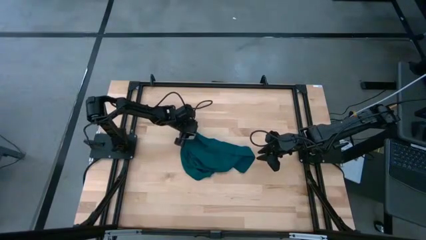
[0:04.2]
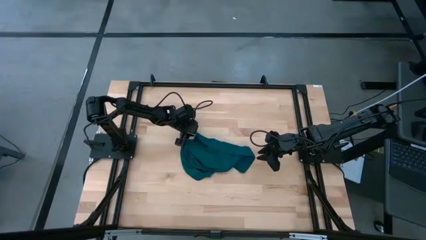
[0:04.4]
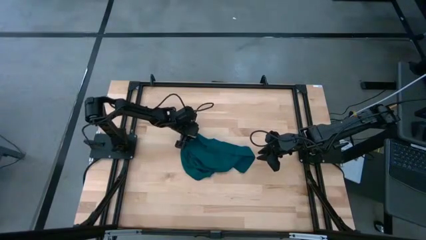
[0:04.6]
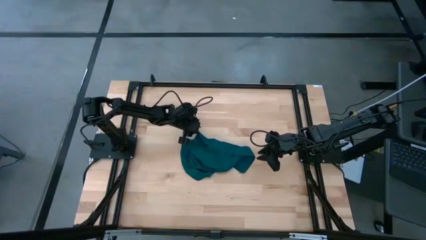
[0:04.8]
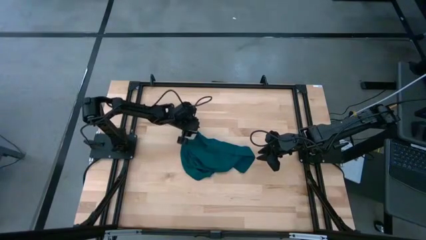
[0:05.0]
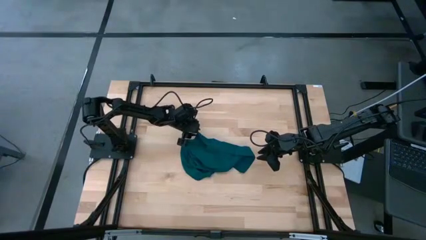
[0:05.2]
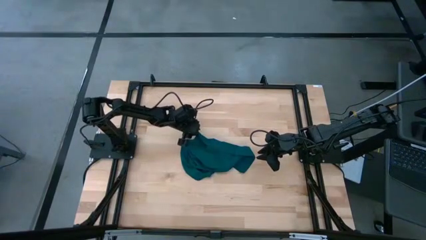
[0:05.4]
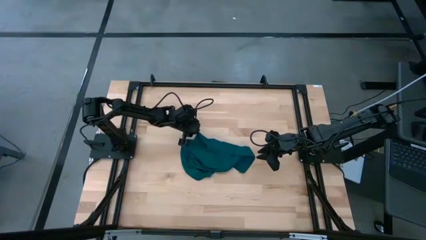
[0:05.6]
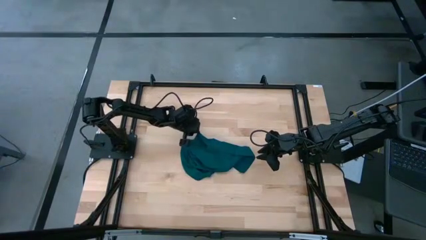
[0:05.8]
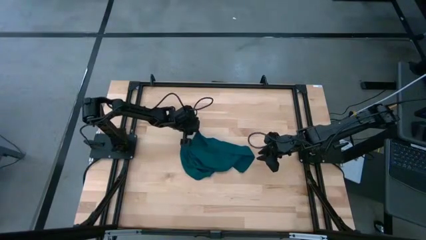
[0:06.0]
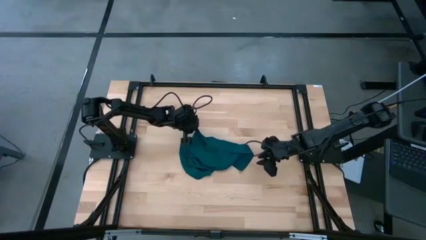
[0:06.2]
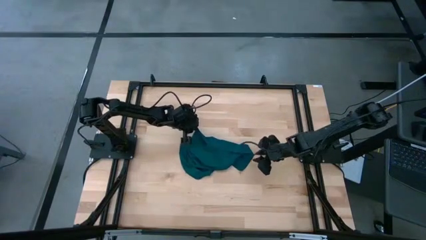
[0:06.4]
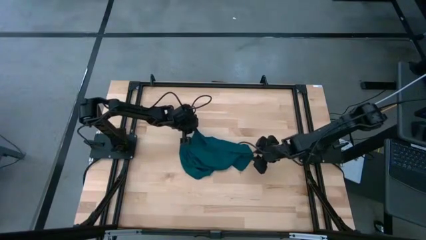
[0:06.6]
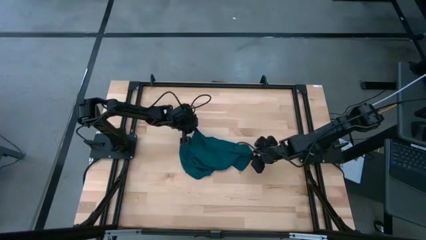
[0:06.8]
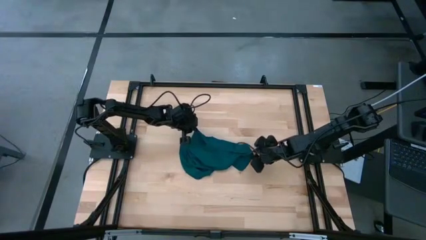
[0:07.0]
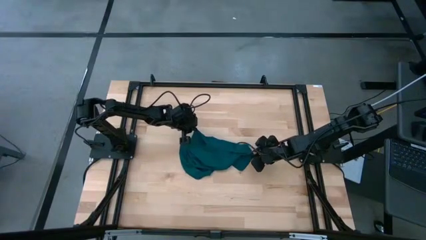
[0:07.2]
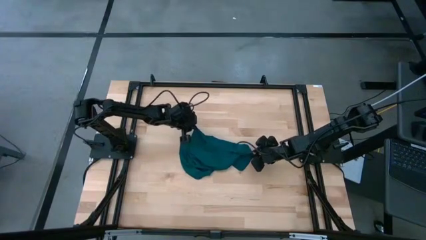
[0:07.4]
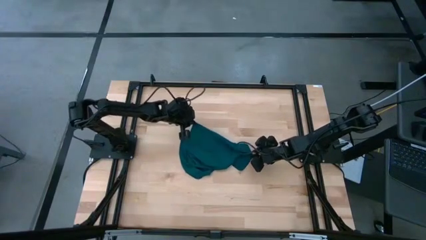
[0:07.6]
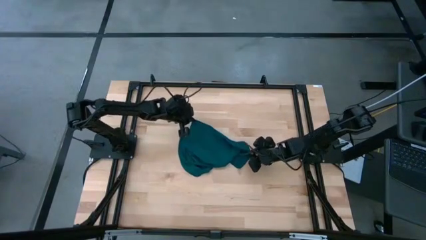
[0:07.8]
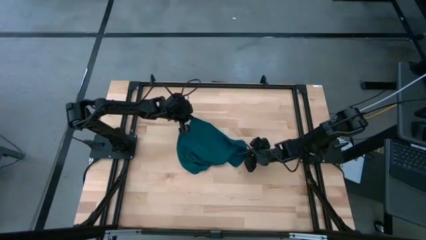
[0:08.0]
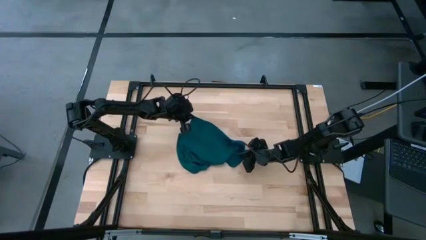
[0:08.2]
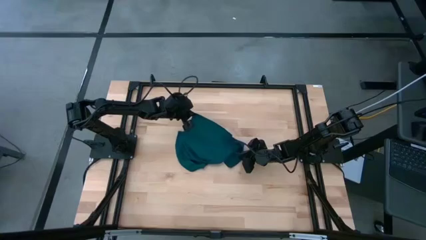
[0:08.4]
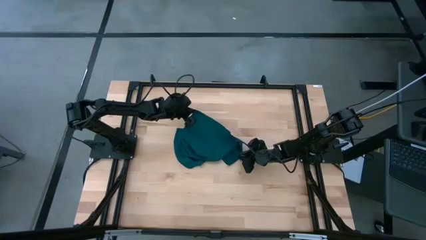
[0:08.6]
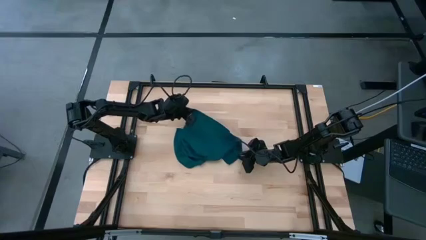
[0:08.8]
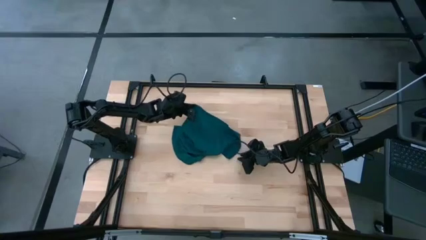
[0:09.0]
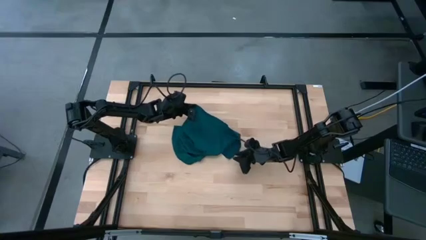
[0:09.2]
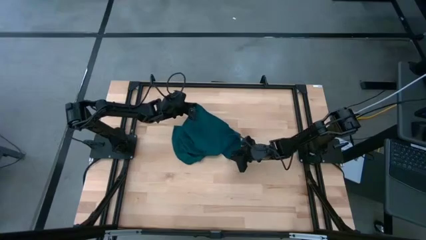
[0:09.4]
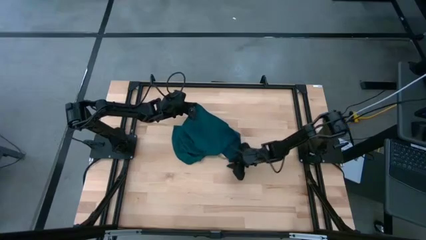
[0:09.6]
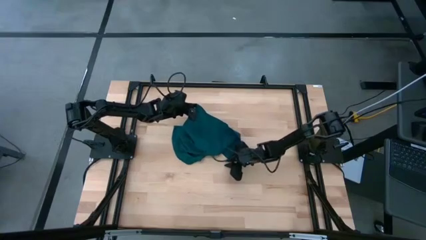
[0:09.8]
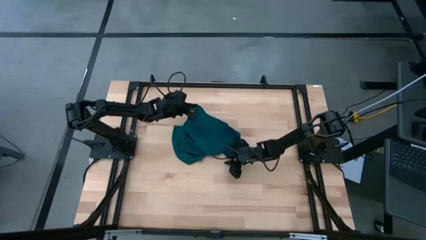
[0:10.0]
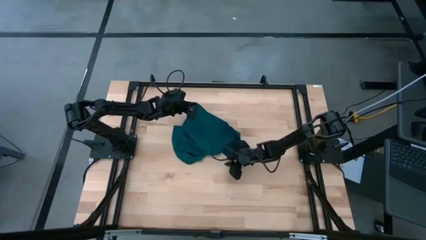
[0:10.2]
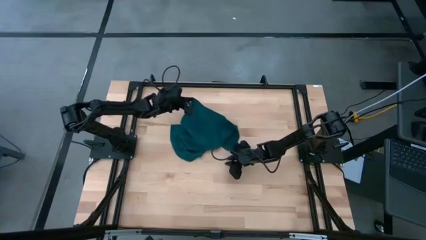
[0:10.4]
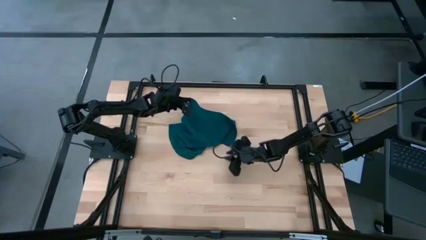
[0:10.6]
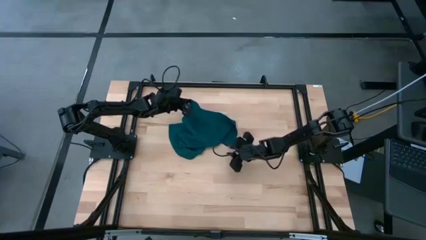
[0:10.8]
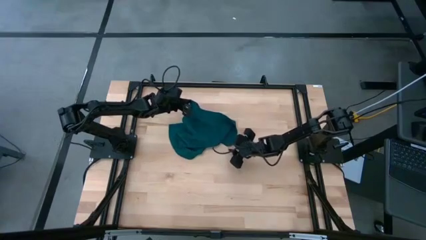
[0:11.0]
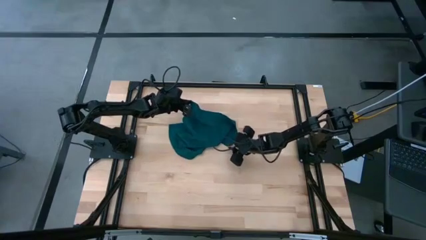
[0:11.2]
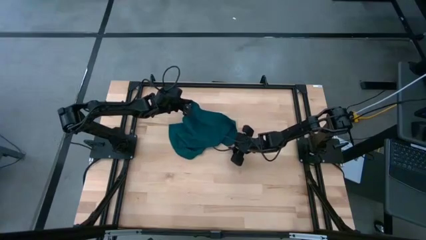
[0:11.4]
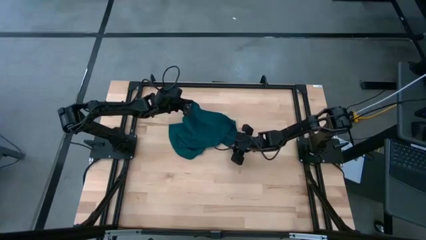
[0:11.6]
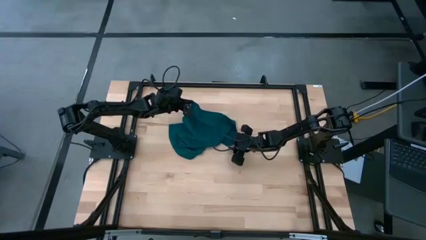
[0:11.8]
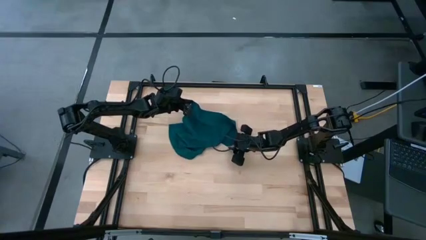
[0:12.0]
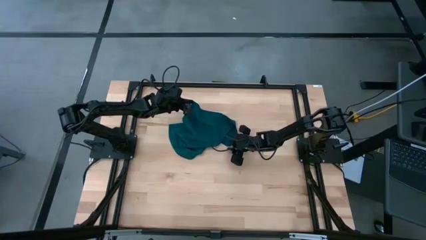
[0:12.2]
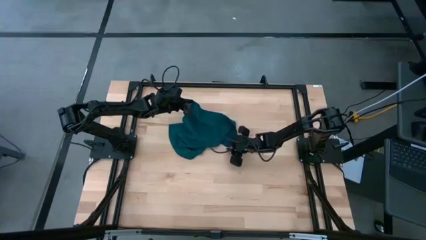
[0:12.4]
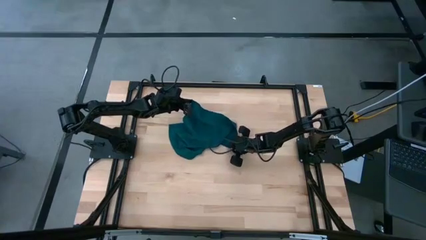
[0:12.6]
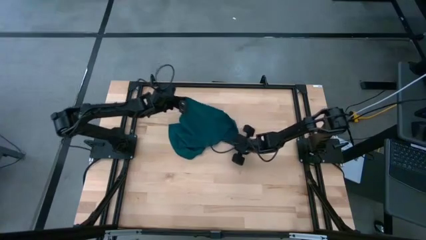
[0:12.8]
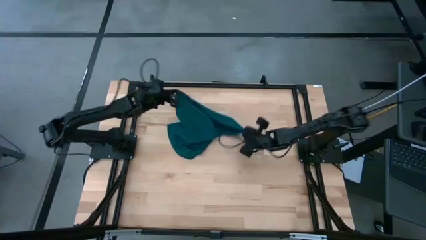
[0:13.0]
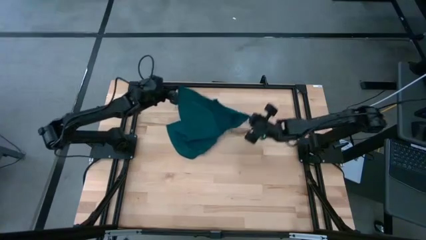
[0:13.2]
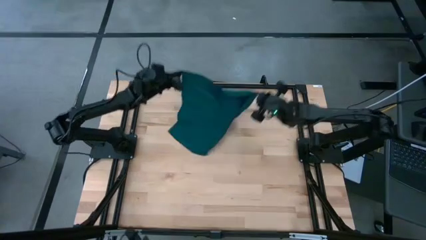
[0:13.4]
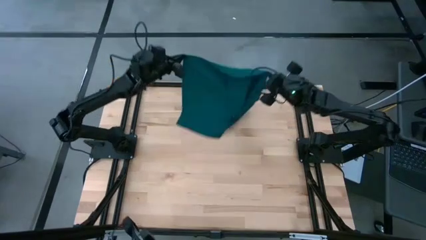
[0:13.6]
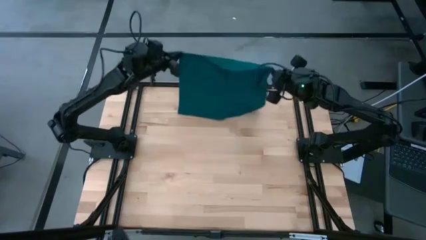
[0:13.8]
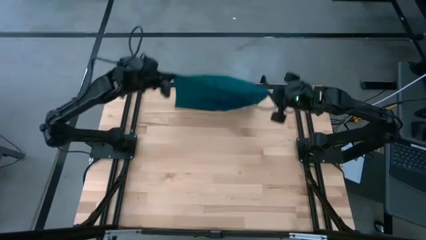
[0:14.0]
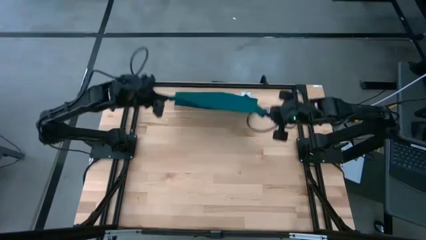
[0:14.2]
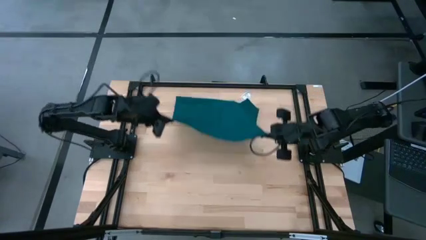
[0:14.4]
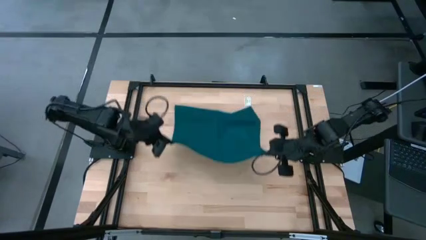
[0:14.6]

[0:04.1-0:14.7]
Task: Fold microfiber towels
Fold the green napkin

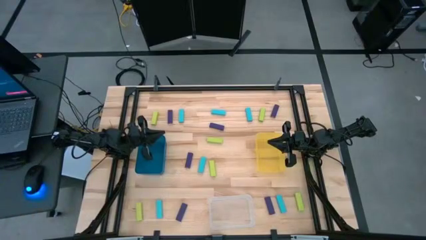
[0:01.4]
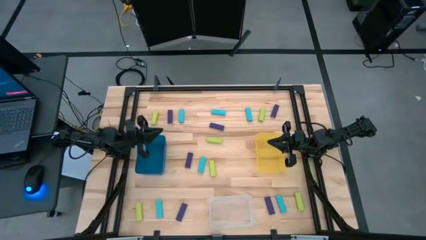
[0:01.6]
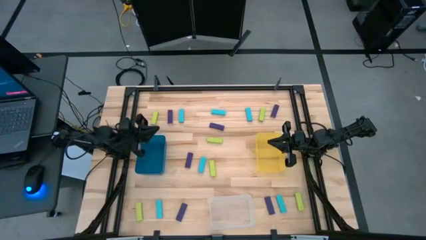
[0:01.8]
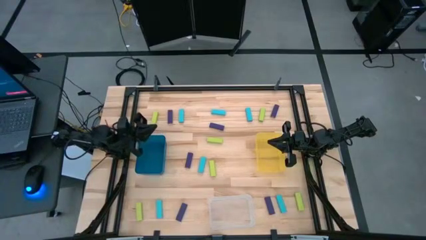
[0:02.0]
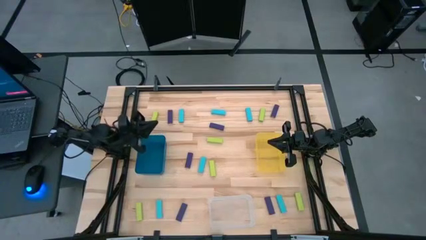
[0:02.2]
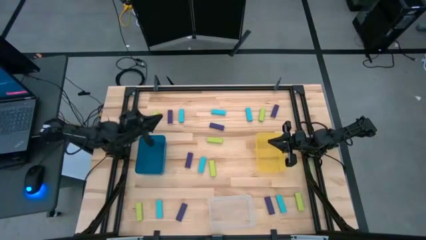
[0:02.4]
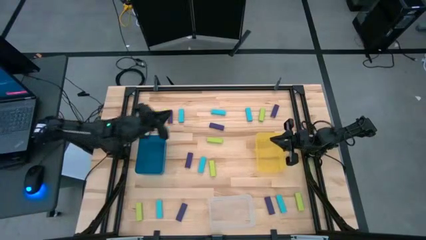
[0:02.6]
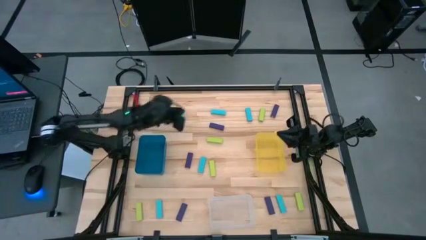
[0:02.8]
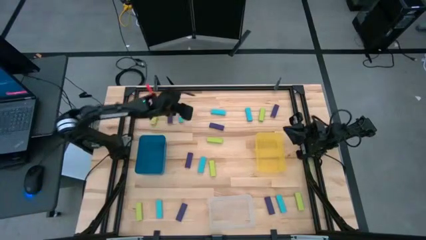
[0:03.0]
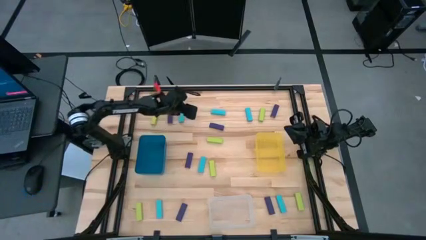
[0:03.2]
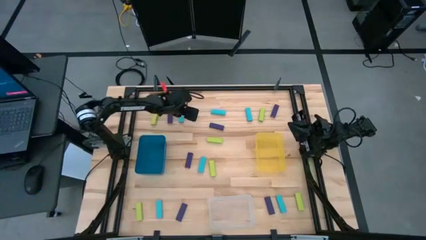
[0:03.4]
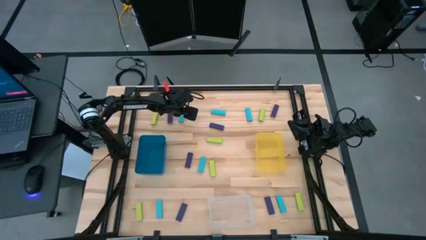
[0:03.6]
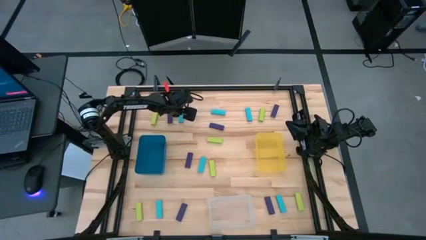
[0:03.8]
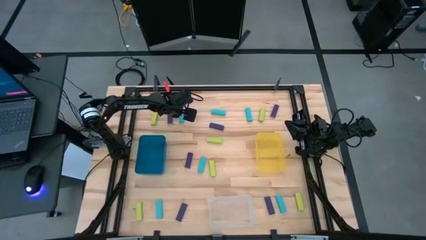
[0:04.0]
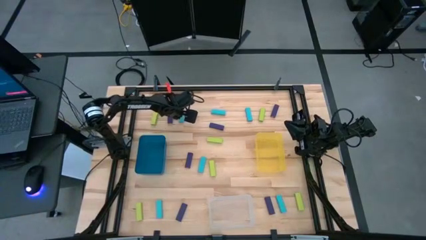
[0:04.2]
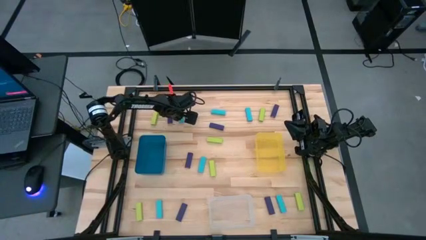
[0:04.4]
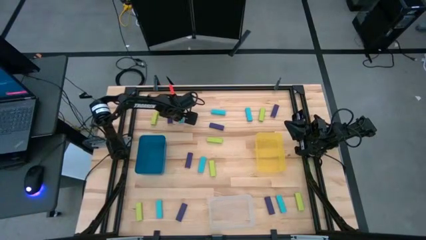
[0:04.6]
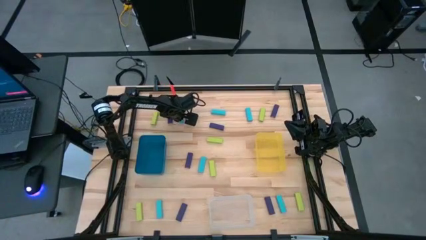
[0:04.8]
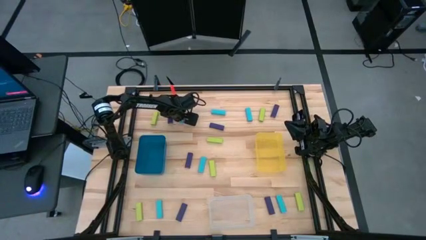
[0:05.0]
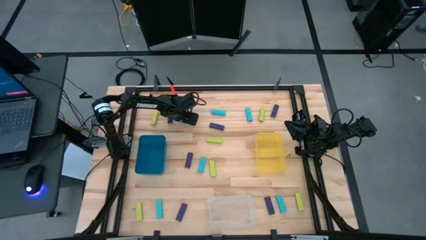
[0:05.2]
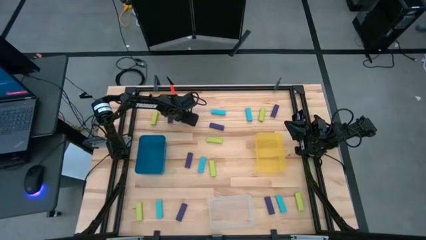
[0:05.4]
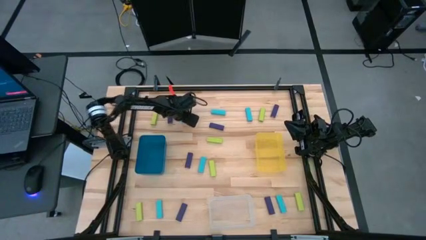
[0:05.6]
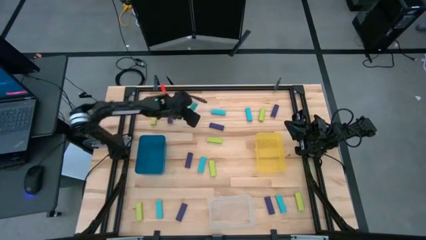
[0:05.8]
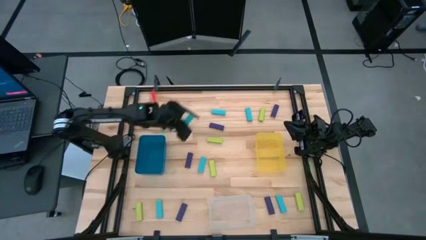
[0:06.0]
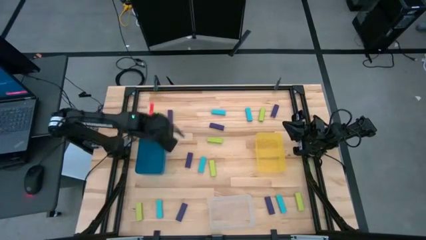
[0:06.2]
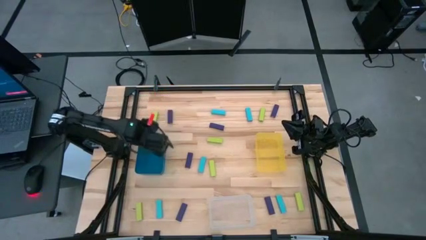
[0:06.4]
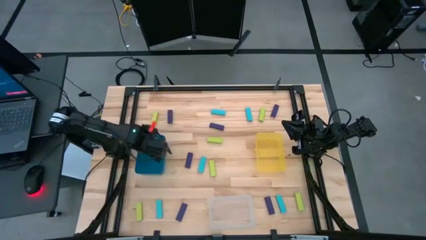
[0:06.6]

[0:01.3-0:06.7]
Task: Sort blocks
Put the light blue block into the blue bin
